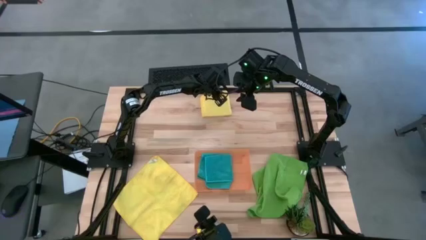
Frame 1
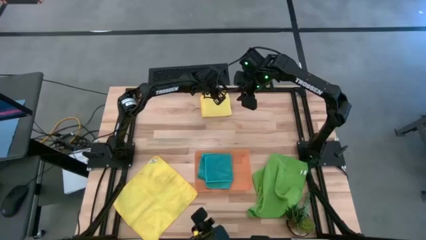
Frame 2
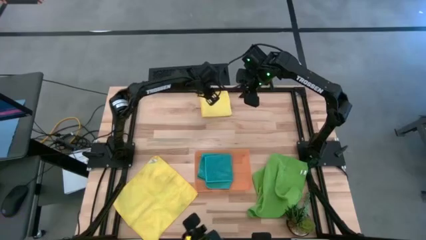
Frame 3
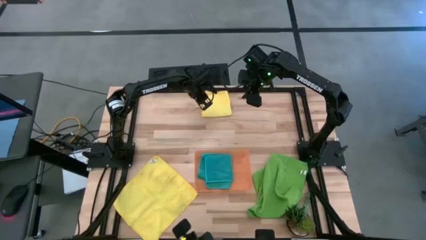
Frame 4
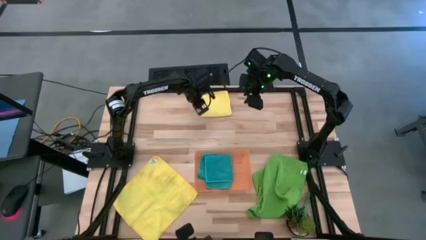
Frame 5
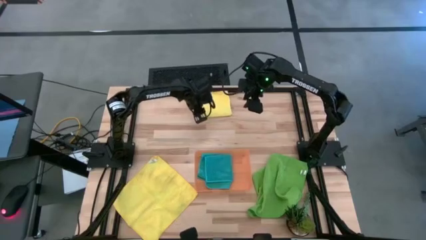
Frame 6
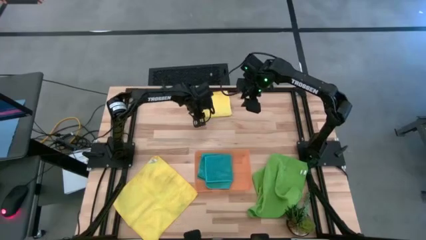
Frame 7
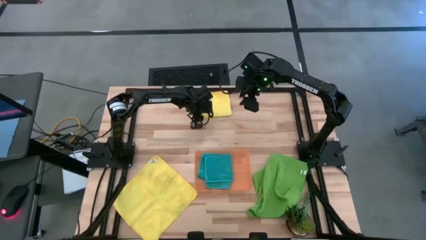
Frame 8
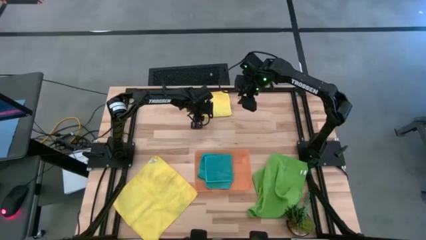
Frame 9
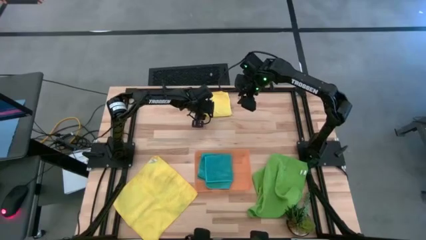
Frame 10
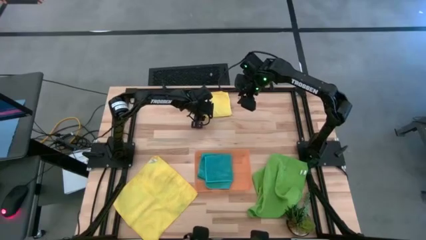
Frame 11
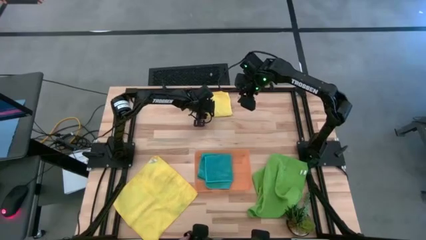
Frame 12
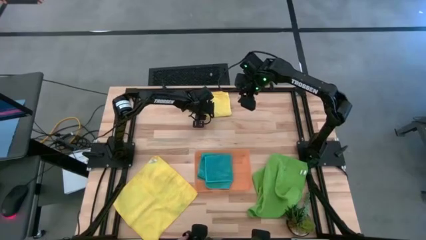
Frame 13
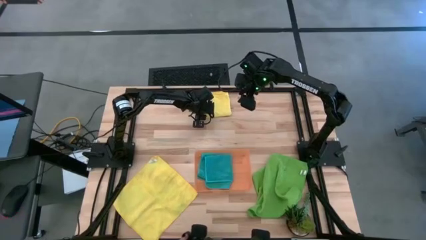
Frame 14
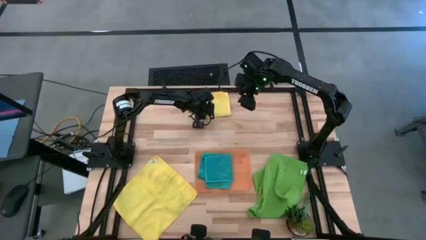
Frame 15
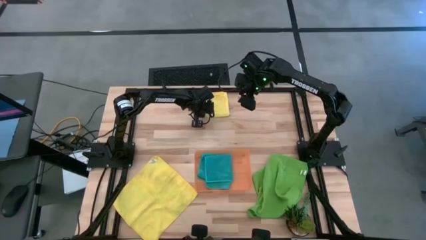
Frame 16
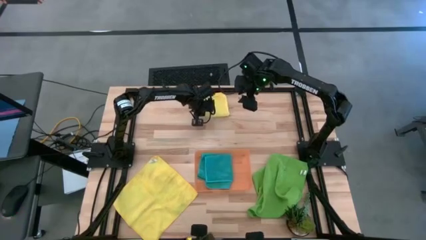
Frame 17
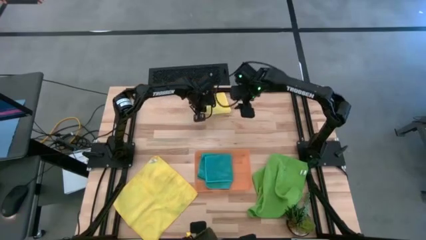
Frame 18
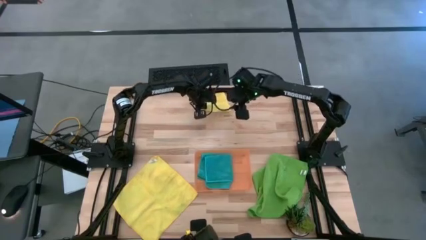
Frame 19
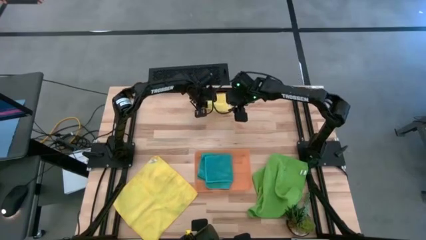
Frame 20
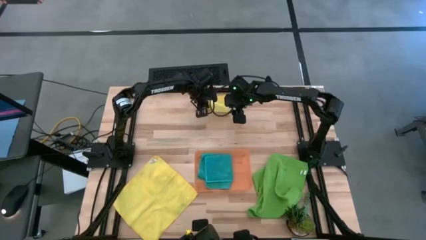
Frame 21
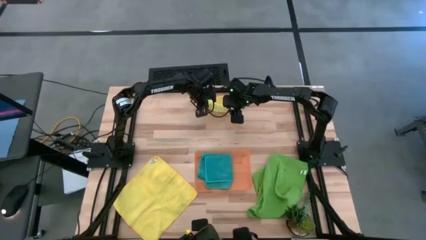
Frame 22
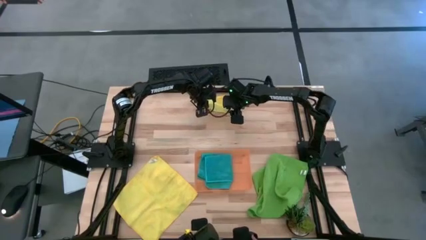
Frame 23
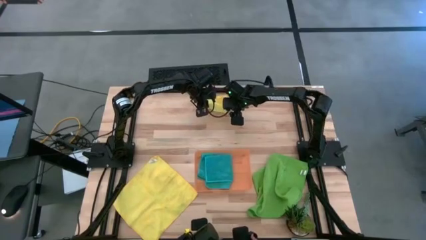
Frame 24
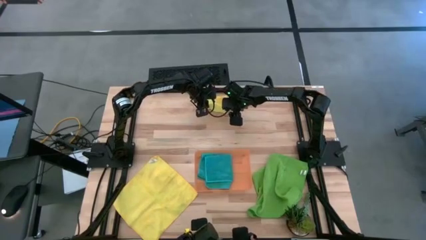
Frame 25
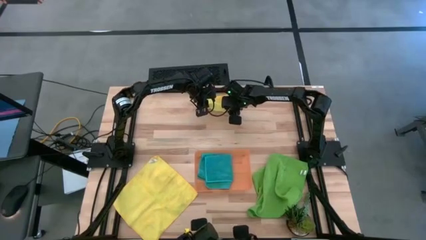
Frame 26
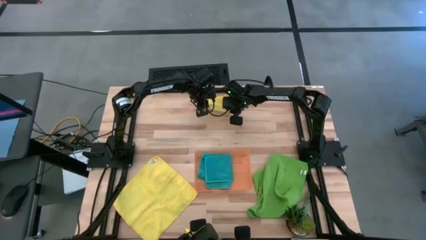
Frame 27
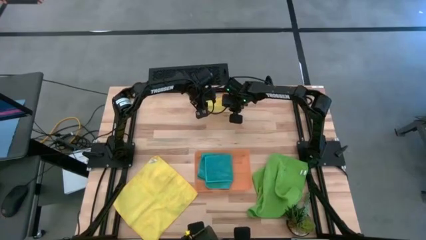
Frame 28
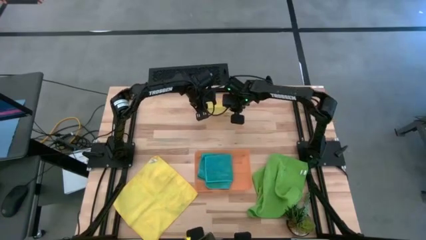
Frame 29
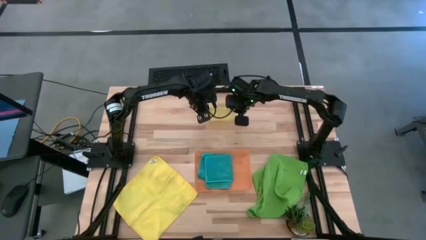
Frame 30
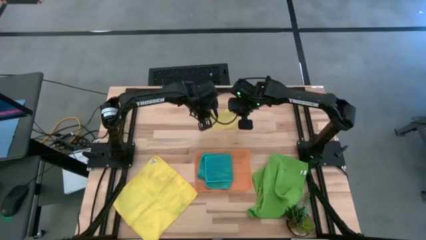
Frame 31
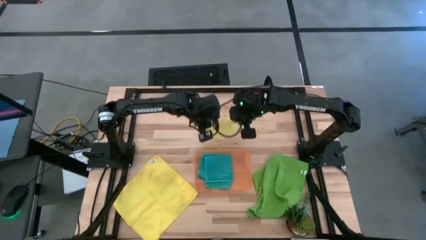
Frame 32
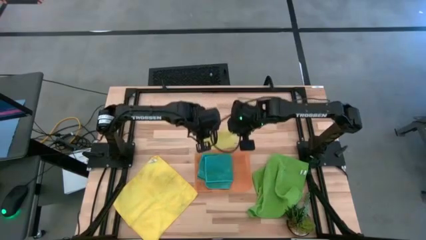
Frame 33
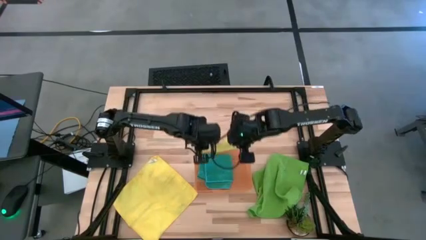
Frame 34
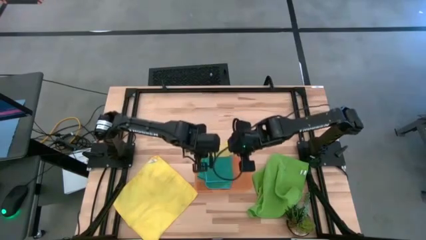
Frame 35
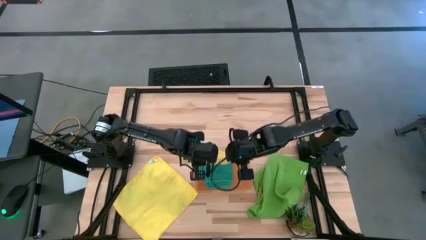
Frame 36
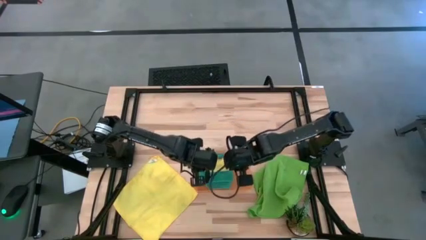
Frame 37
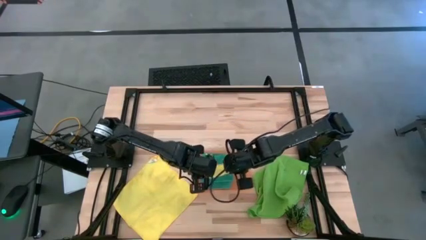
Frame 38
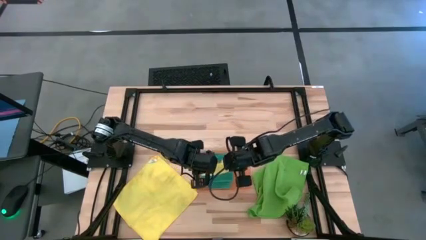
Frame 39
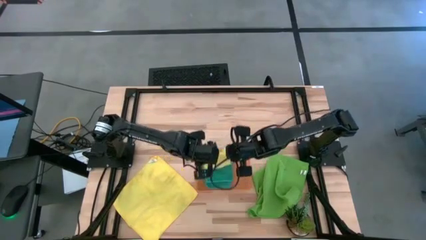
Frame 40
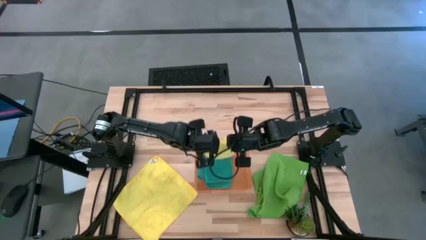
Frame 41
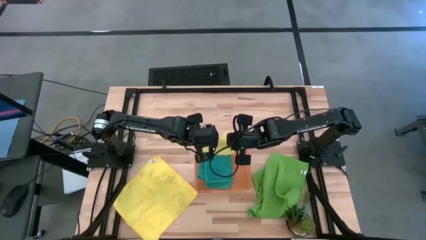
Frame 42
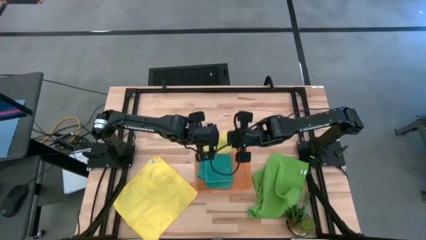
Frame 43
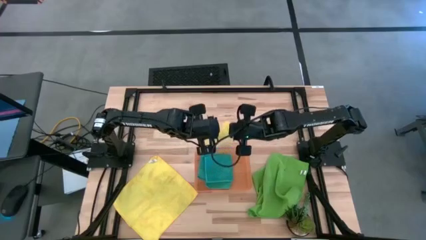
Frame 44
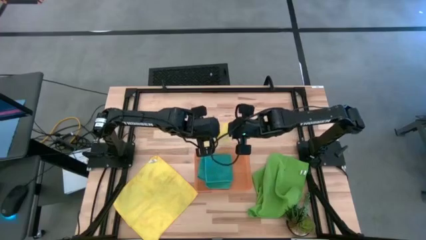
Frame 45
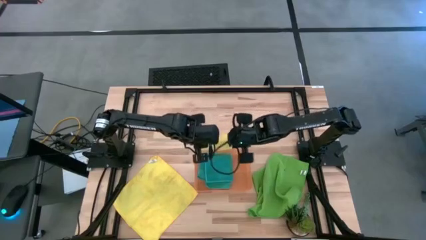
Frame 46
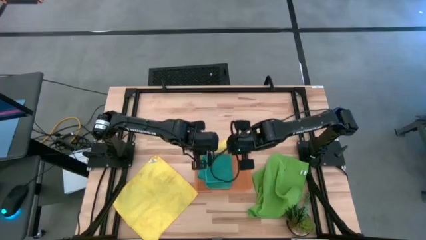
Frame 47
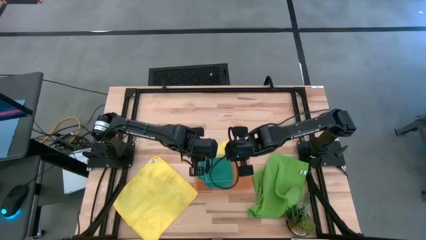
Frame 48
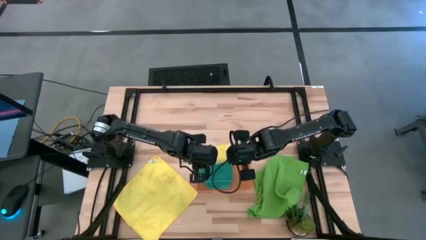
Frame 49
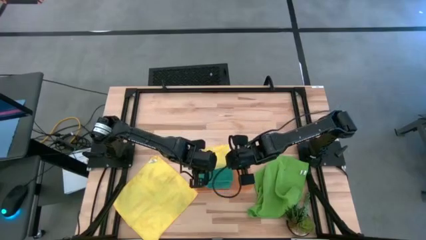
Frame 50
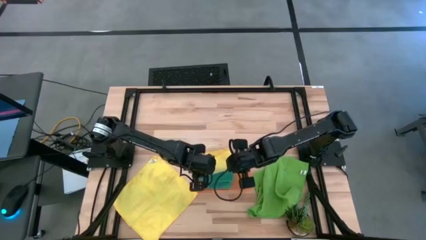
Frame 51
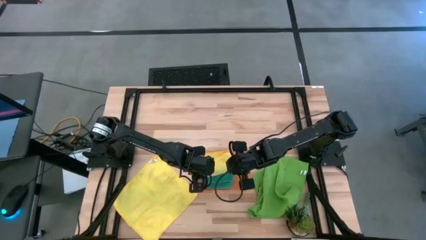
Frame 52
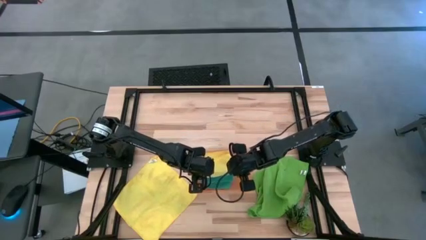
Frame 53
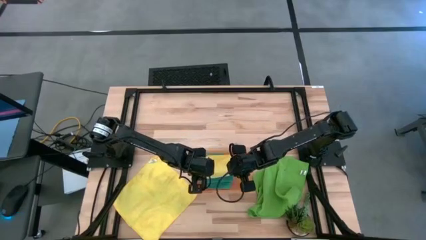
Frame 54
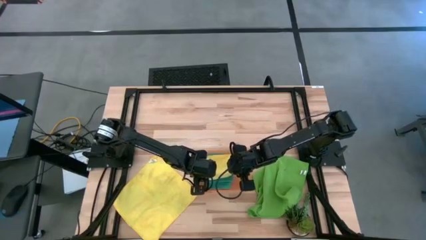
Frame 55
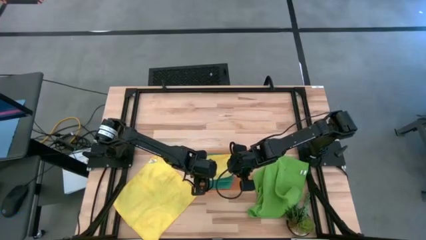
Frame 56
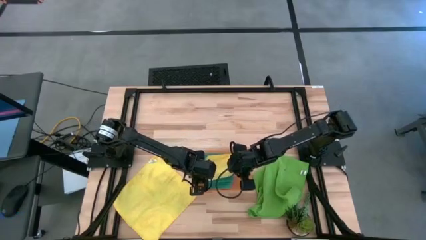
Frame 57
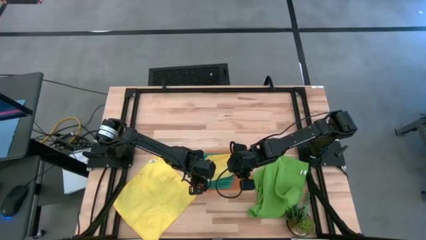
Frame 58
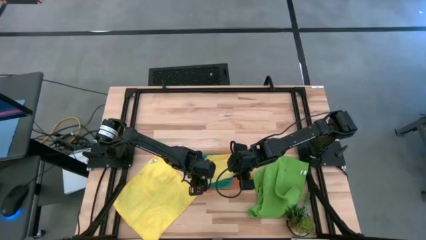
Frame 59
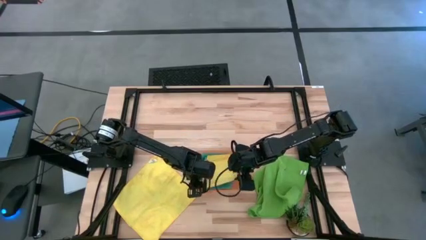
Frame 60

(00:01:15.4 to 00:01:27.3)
Task: Fold microfiber towels
Put the top yellow towel into the bin
